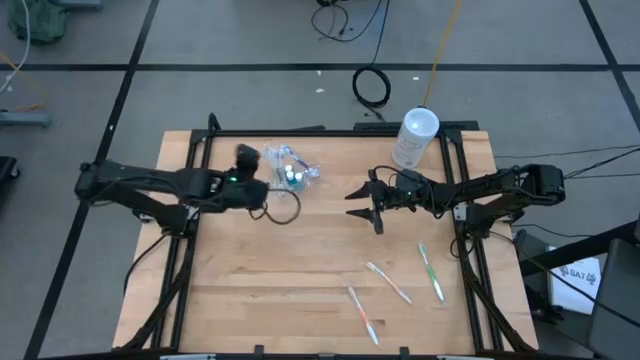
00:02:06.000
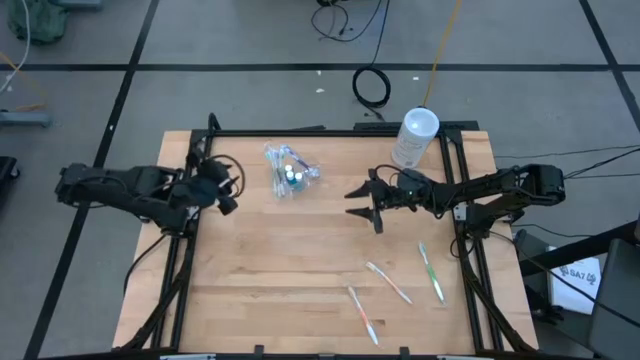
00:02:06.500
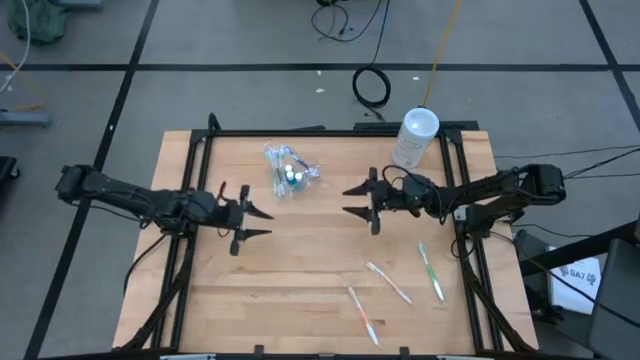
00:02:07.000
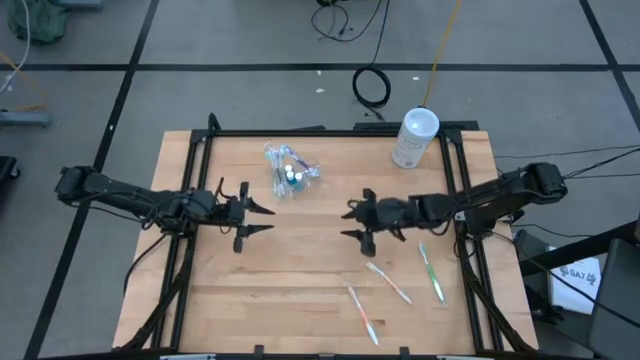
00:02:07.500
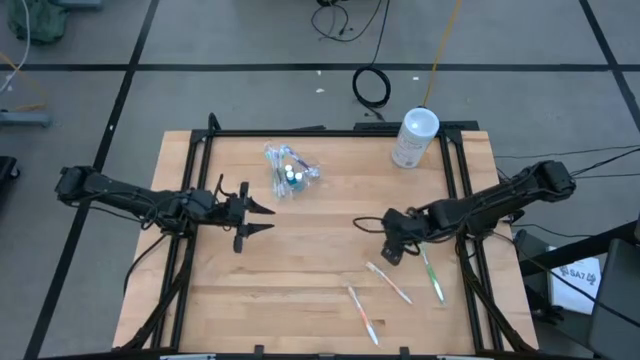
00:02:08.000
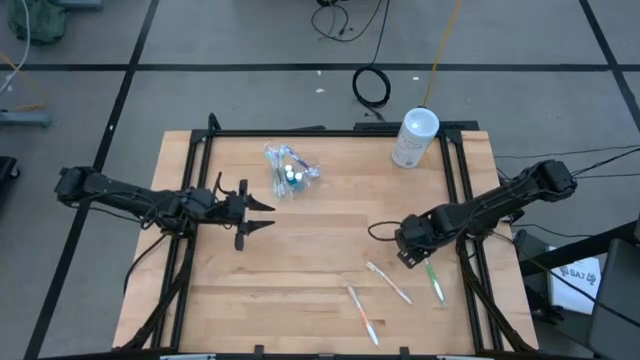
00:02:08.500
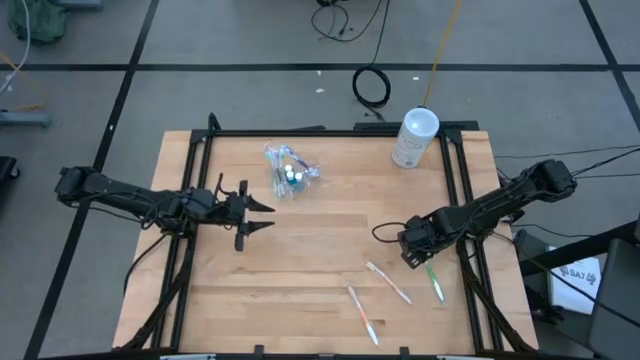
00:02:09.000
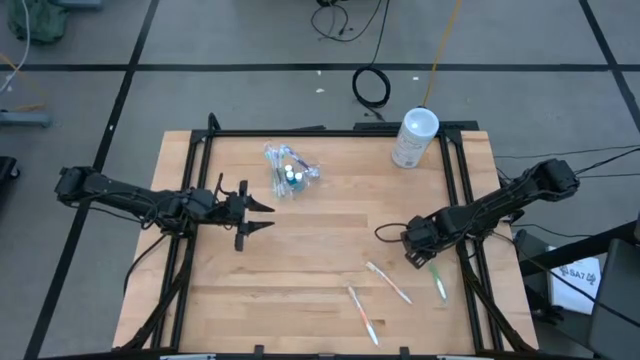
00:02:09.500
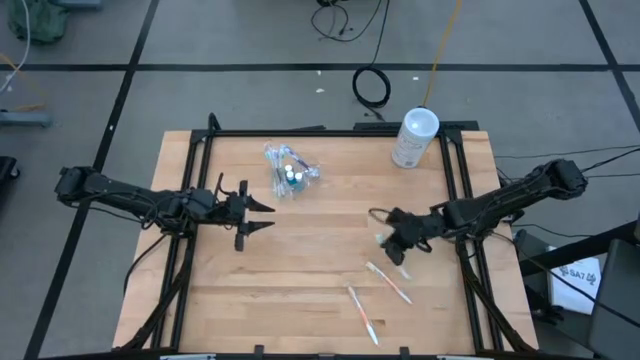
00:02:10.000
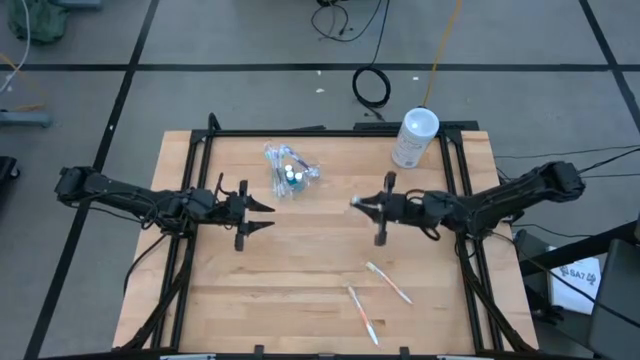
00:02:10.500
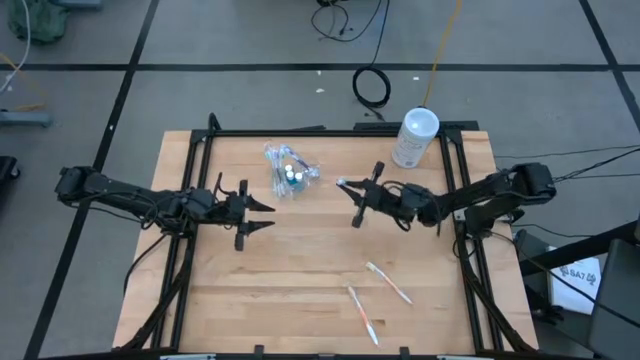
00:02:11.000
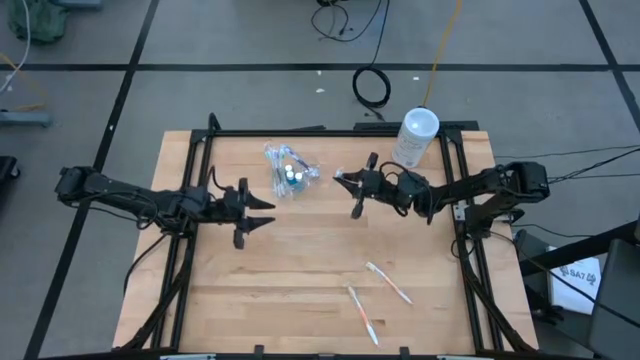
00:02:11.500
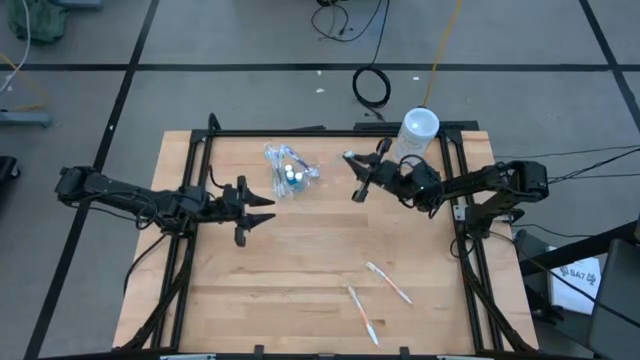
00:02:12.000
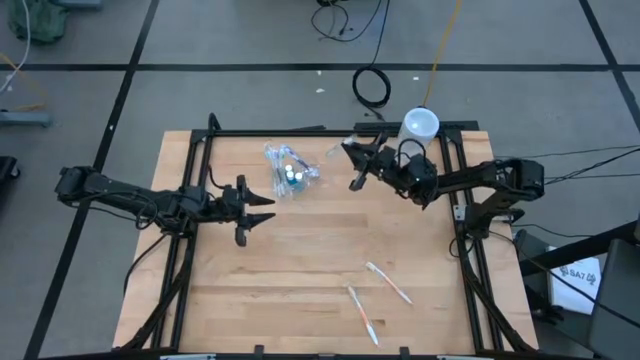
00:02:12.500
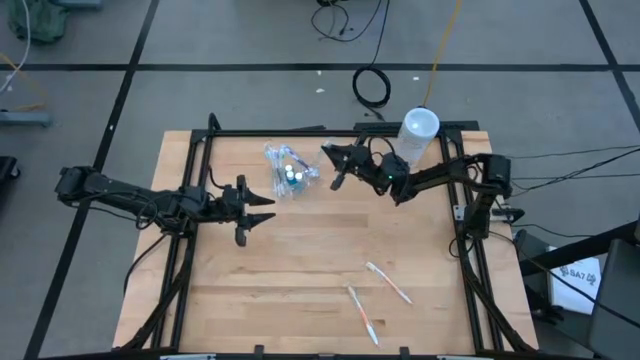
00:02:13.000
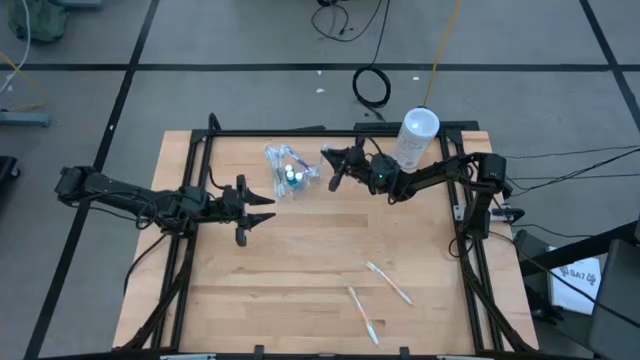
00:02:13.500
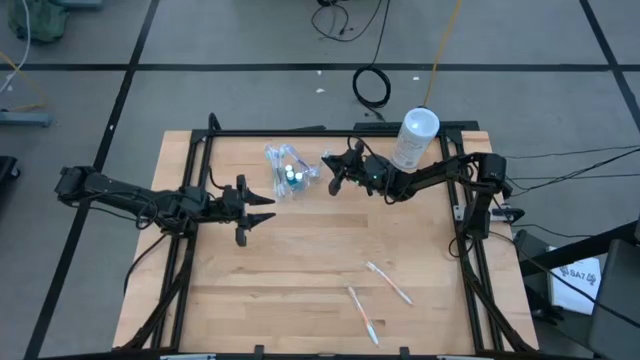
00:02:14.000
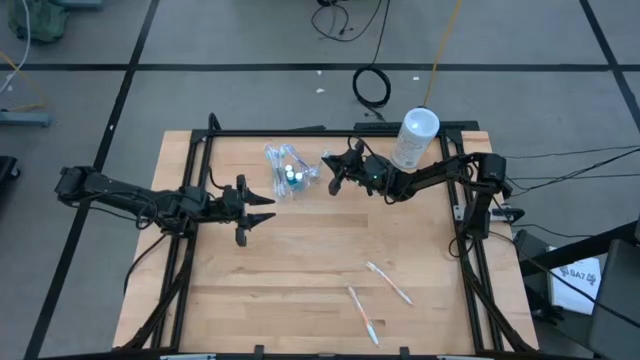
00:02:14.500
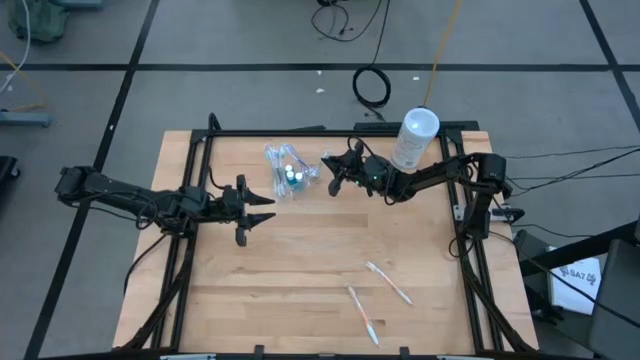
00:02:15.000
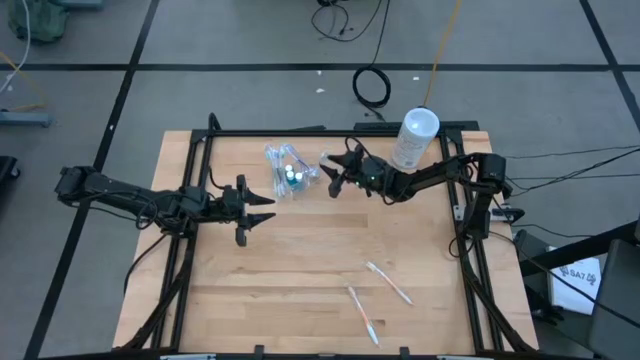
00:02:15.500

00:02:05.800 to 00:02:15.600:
Task: Pick & Place toothbrushing station
Put the green toothbrush into the transparent organizer

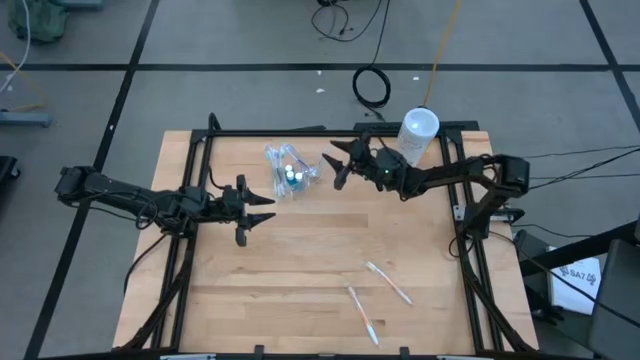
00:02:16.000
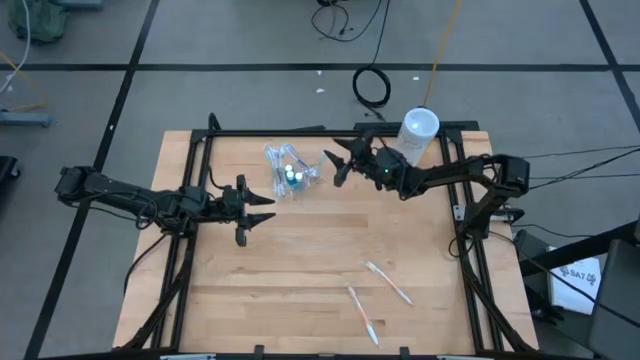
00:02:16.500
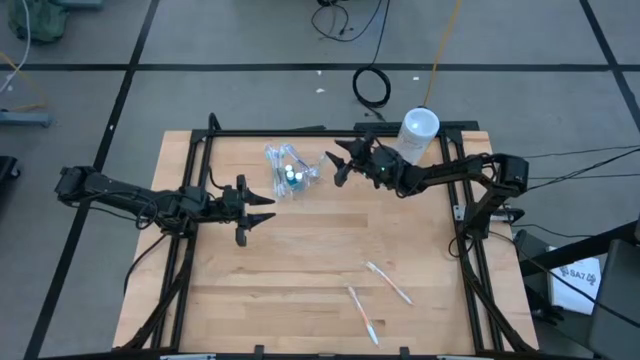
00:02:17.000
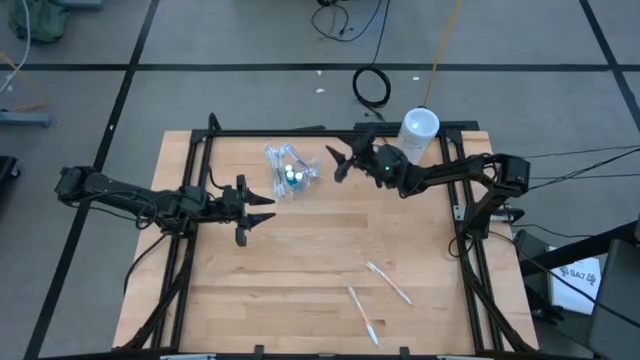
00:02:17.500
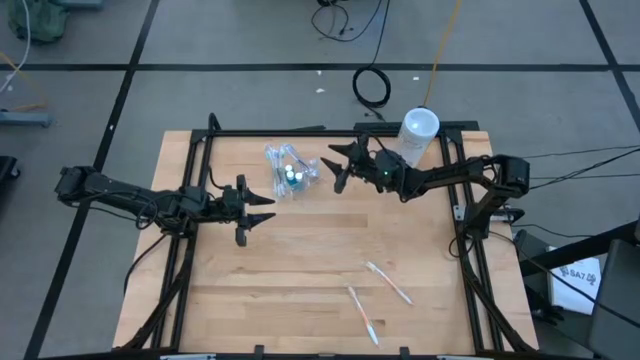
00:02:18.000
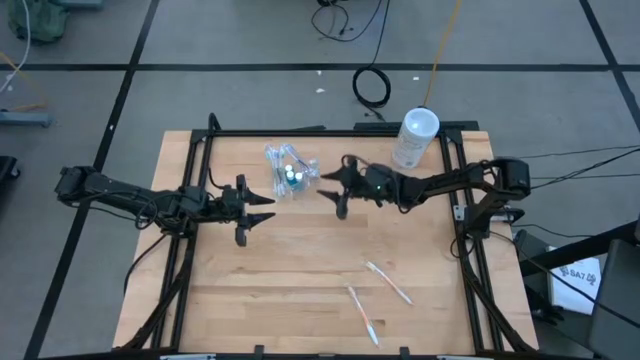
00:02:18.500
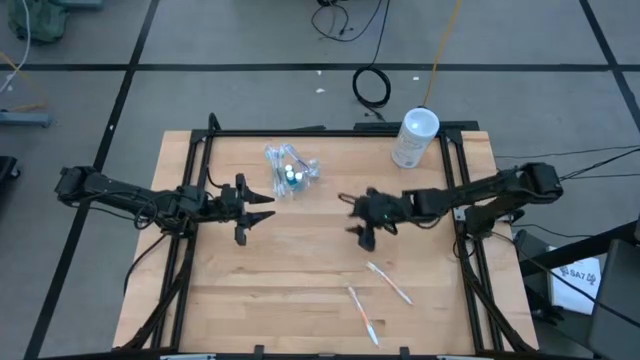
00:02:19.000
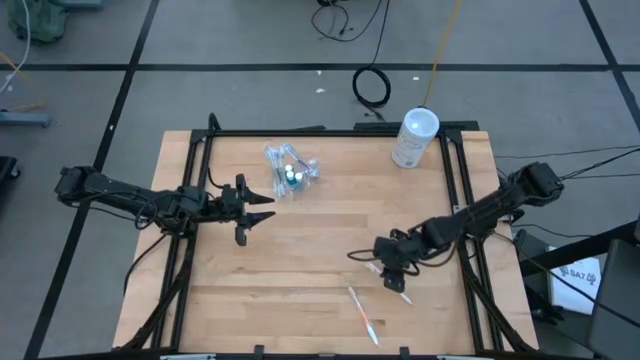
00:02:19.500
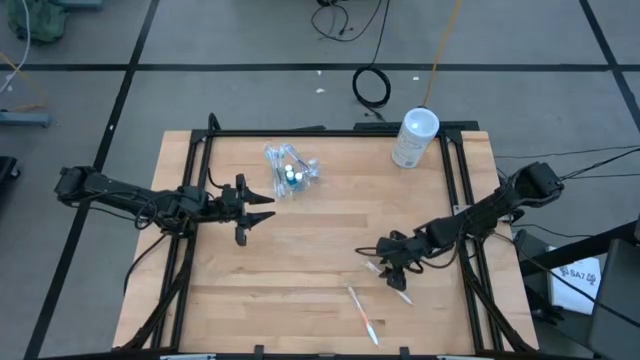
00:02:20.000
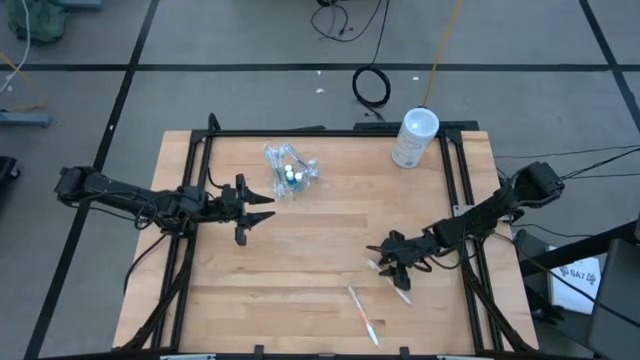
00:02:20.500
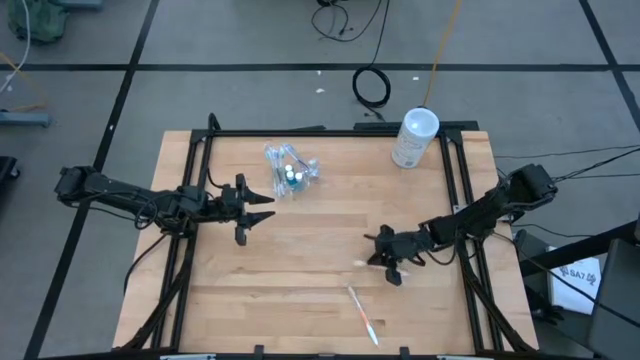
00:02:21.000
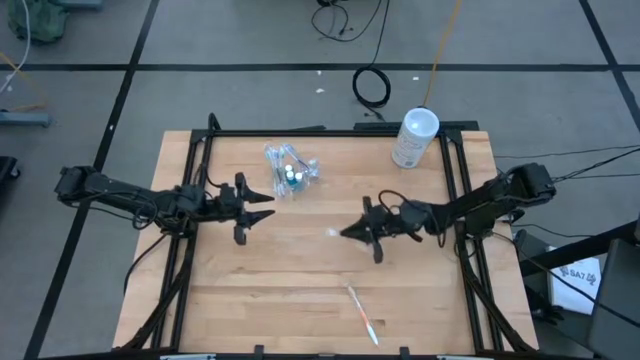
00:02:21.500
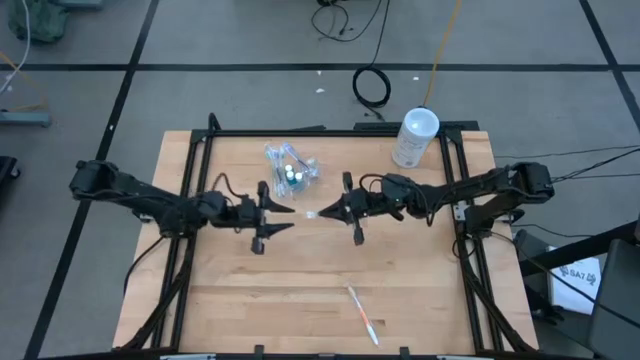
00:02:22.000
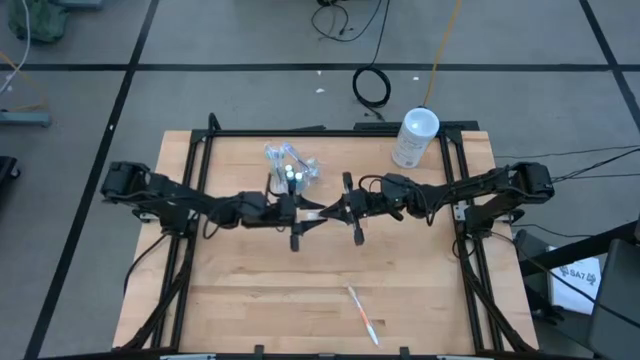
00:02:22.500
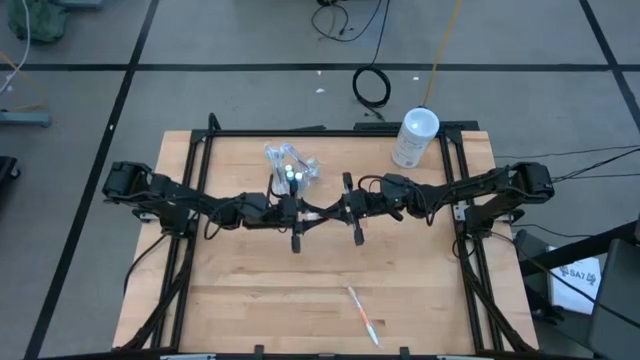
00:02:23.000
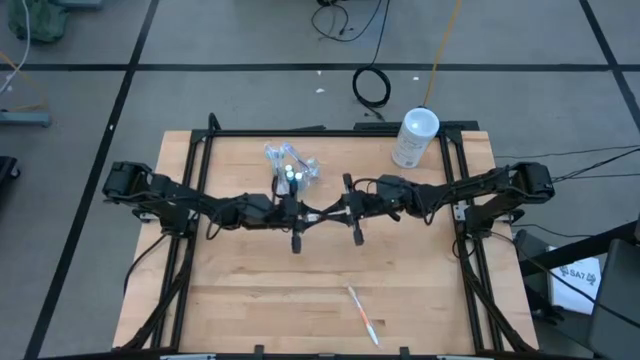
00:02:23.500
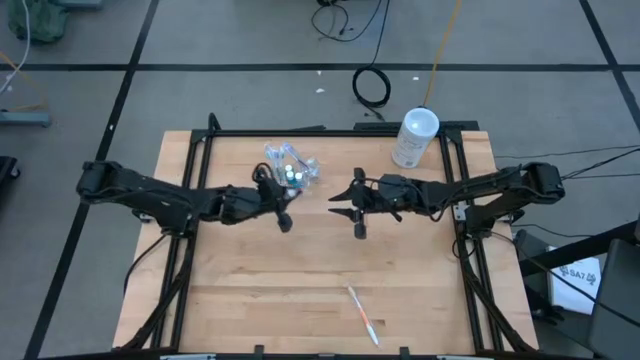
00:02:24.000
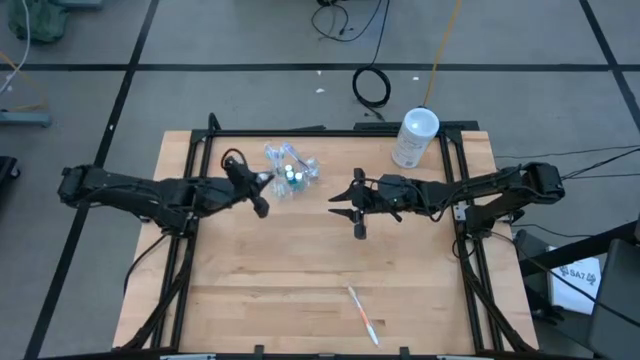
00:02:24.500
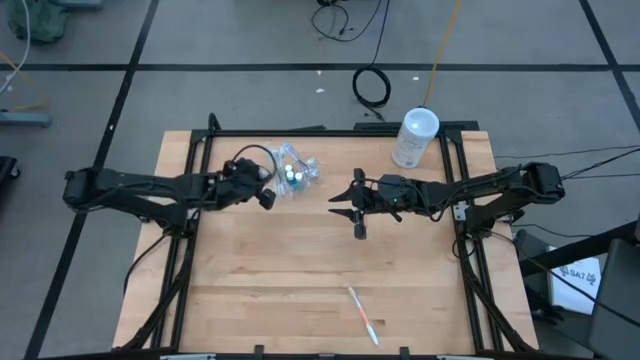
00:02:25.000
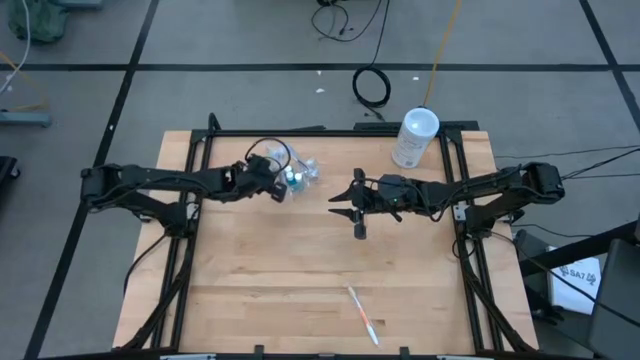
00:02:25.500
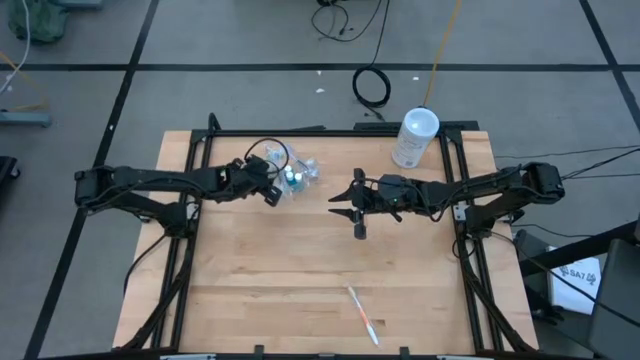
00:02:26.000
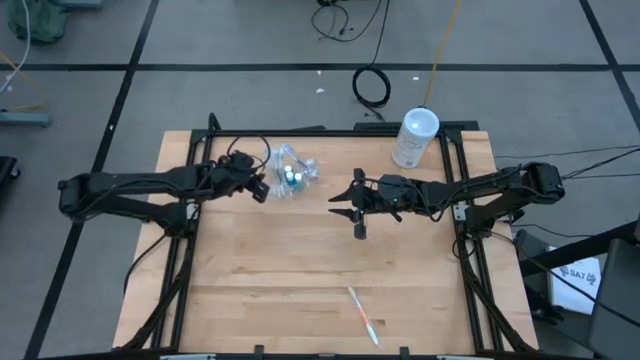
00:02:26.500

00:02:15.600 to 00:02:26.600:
Put the orange toothbrush into the transparent organizer
